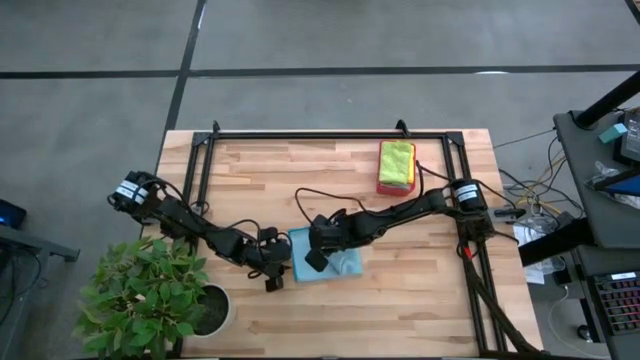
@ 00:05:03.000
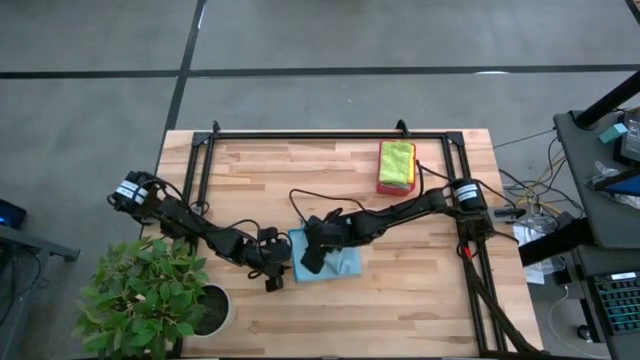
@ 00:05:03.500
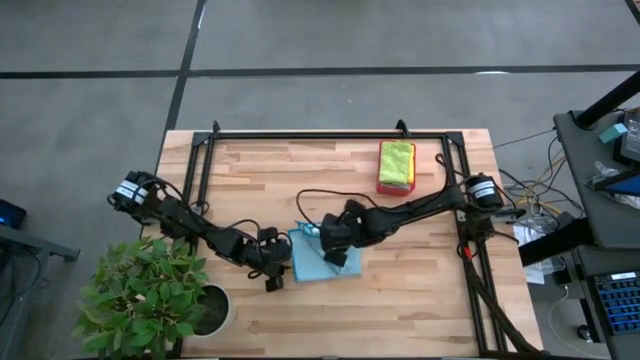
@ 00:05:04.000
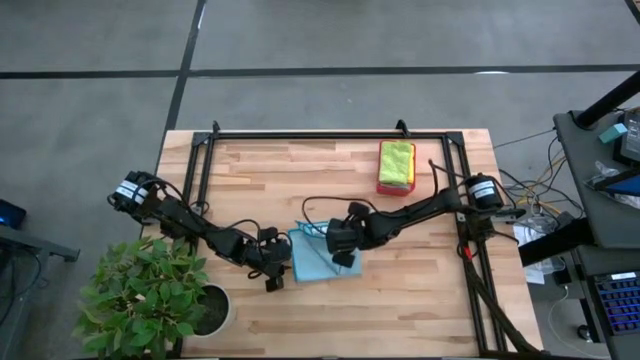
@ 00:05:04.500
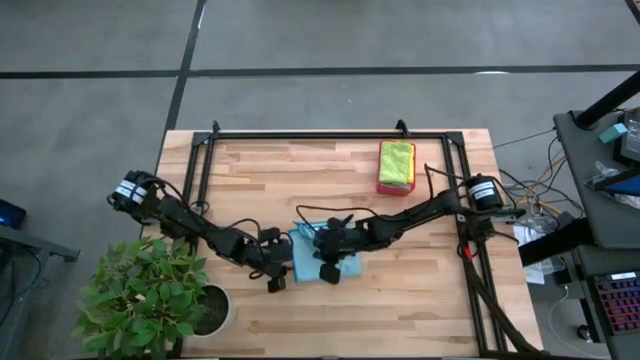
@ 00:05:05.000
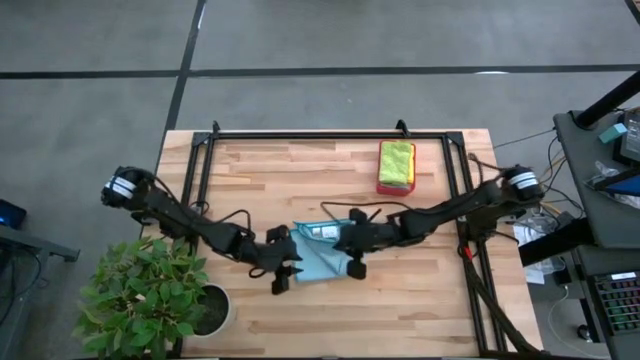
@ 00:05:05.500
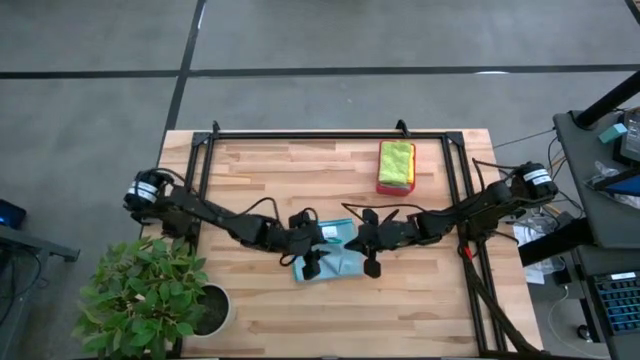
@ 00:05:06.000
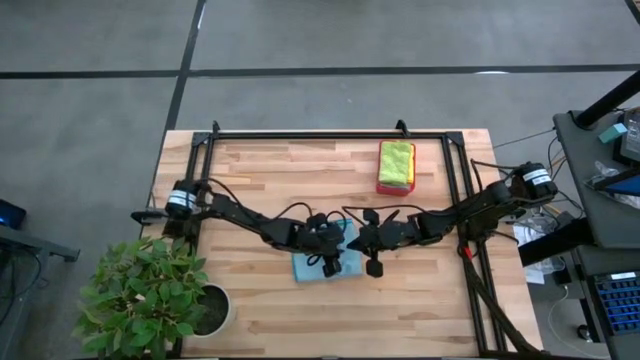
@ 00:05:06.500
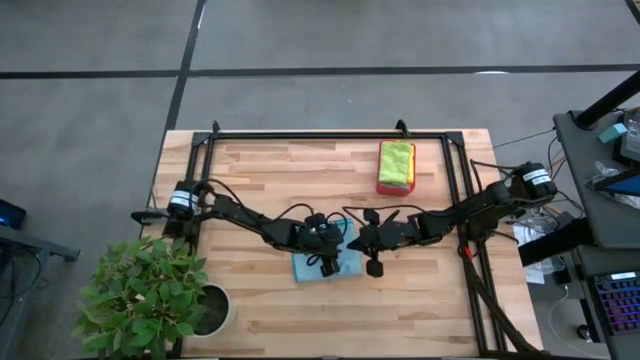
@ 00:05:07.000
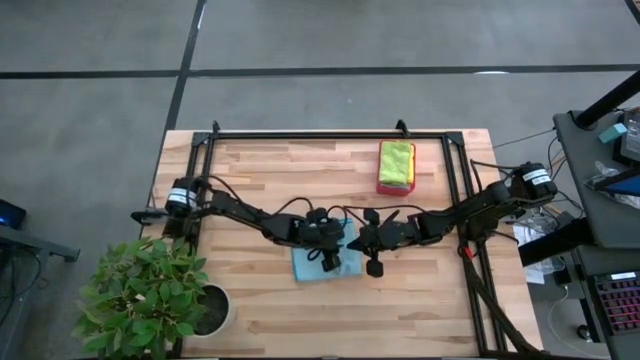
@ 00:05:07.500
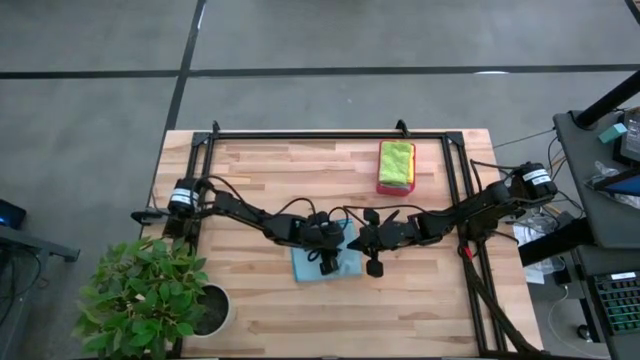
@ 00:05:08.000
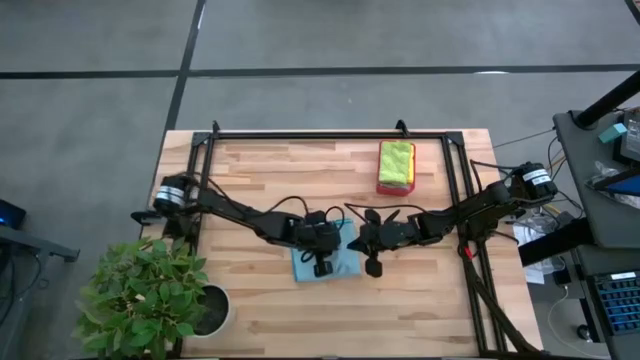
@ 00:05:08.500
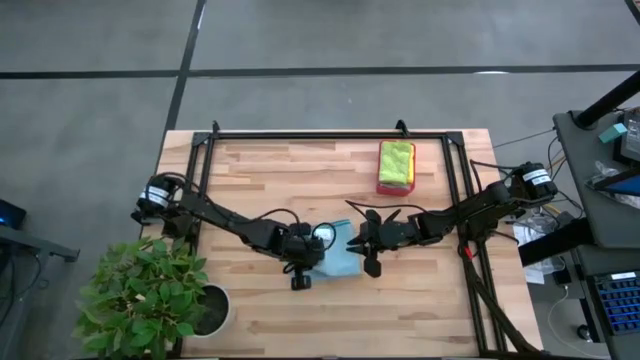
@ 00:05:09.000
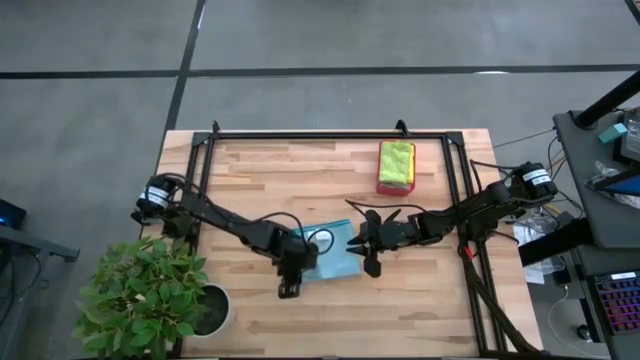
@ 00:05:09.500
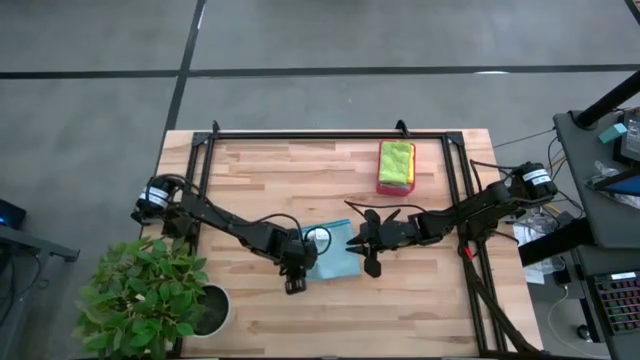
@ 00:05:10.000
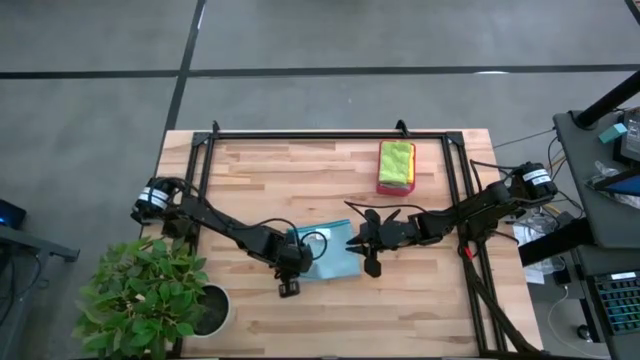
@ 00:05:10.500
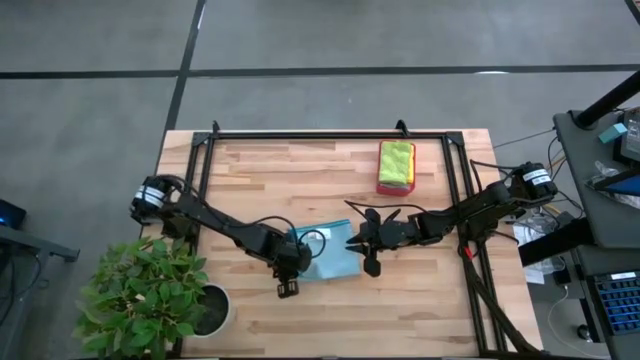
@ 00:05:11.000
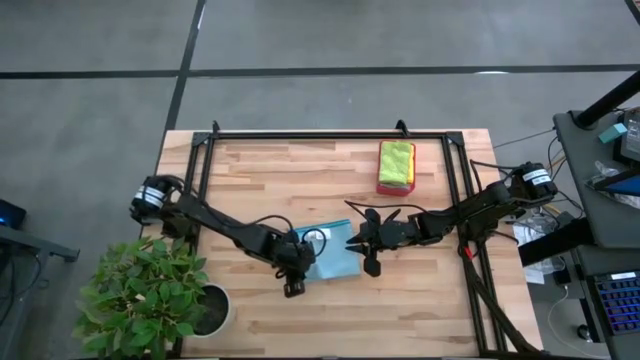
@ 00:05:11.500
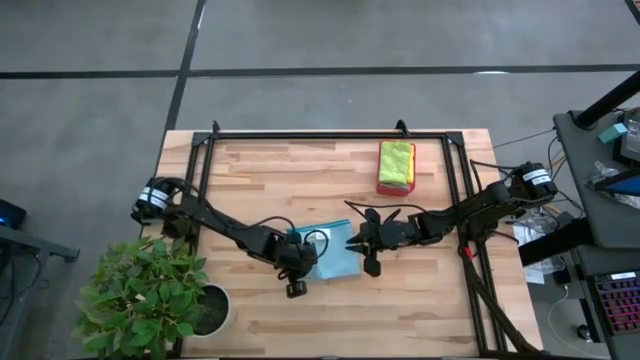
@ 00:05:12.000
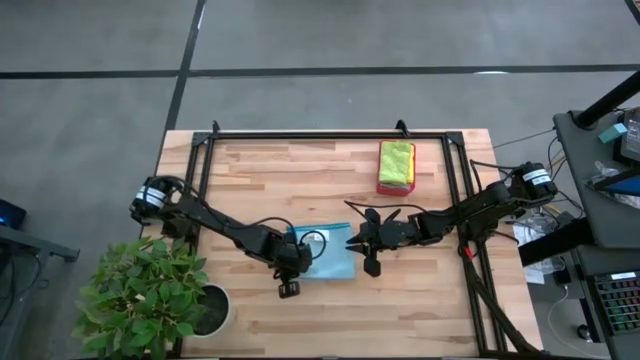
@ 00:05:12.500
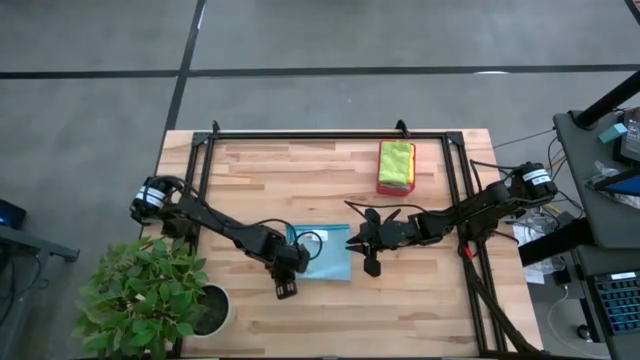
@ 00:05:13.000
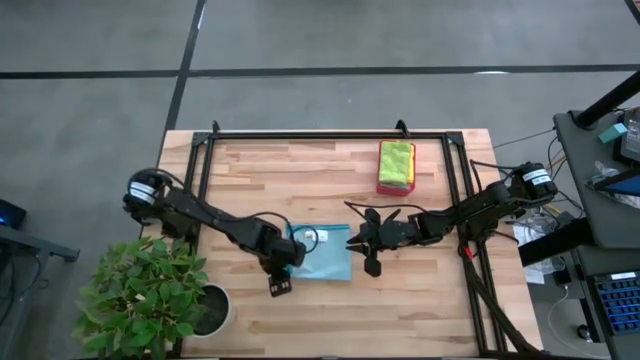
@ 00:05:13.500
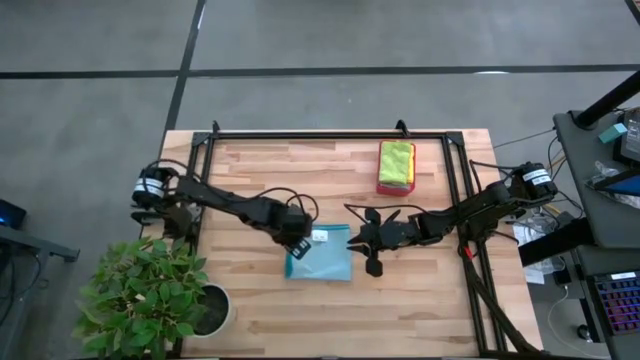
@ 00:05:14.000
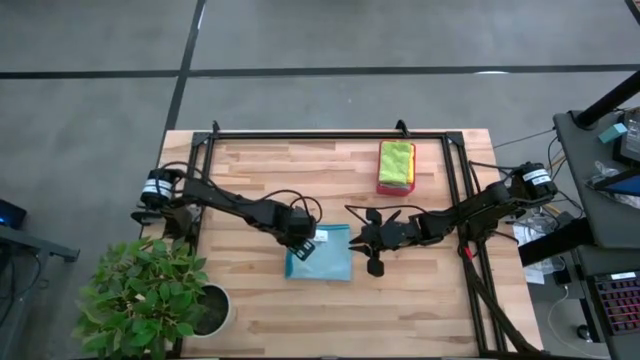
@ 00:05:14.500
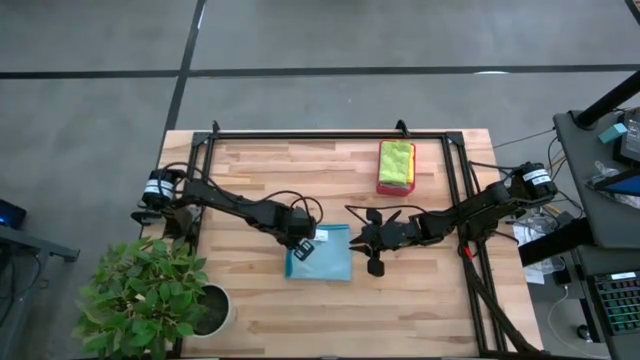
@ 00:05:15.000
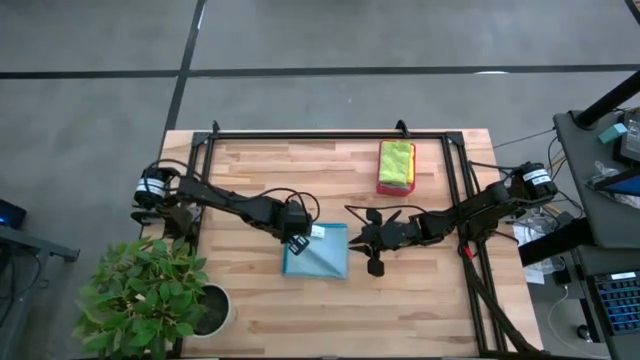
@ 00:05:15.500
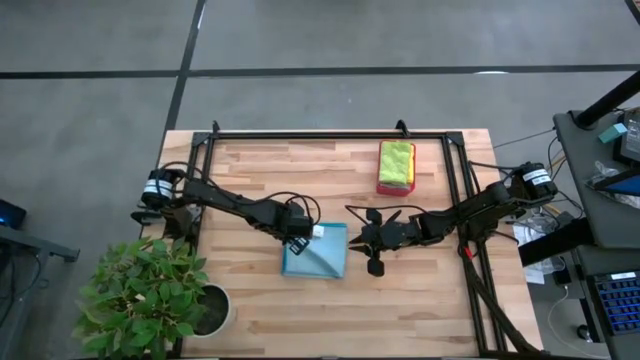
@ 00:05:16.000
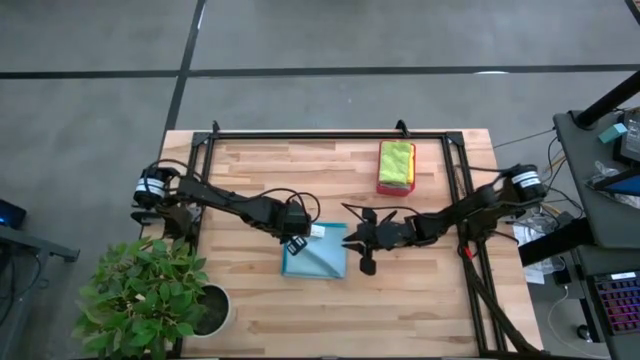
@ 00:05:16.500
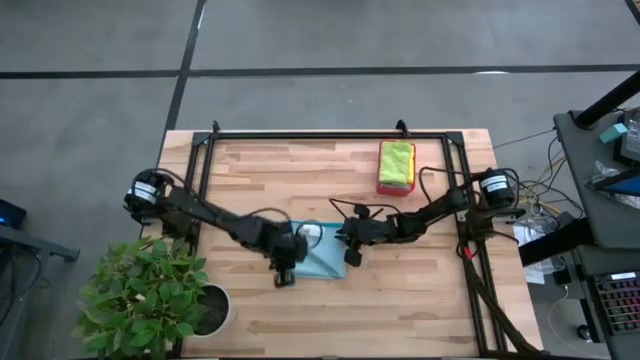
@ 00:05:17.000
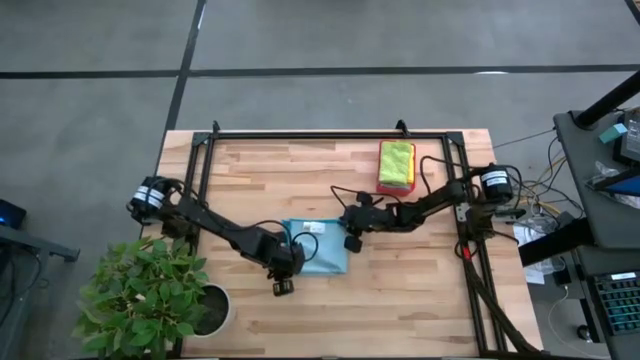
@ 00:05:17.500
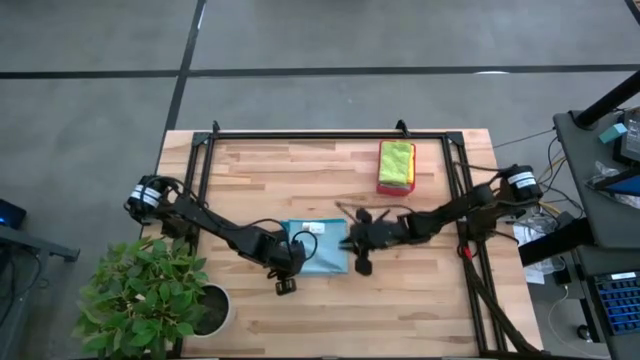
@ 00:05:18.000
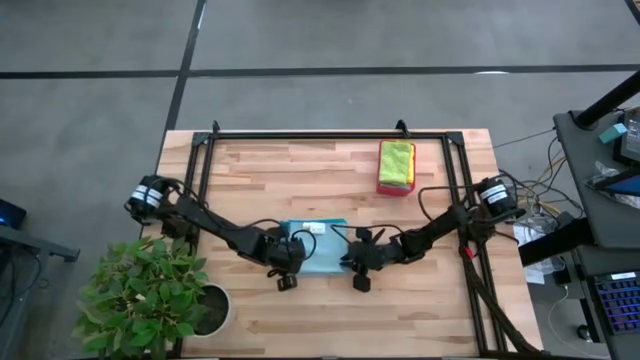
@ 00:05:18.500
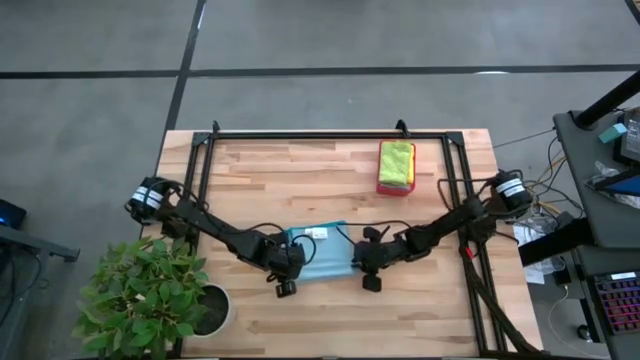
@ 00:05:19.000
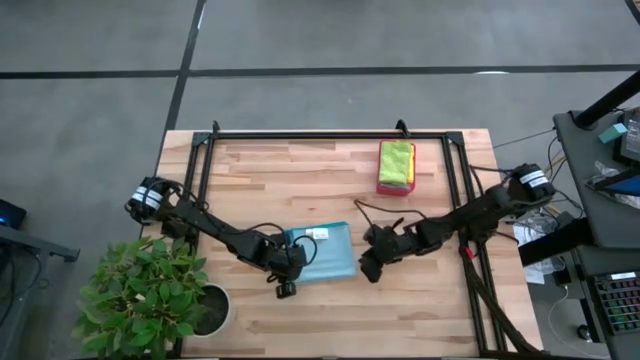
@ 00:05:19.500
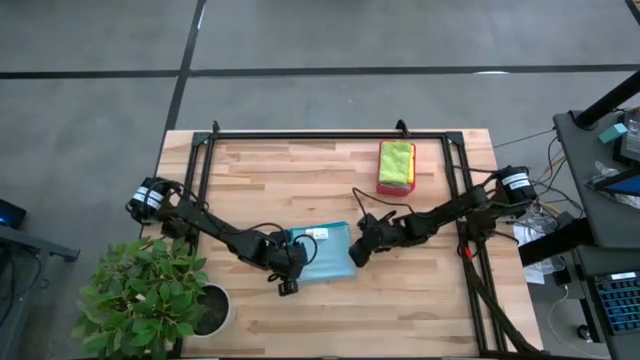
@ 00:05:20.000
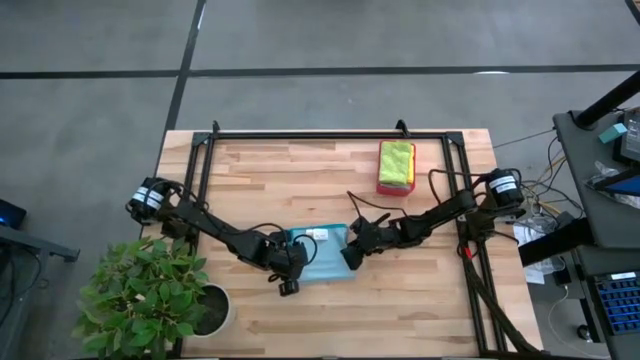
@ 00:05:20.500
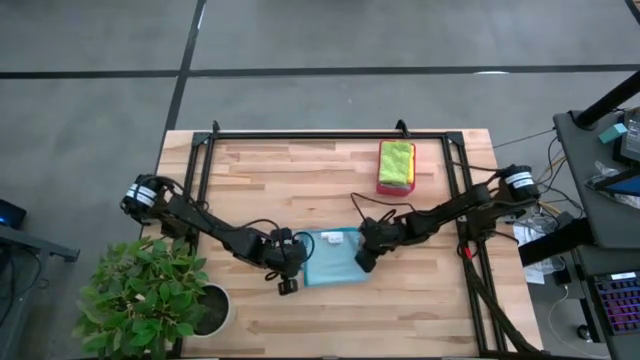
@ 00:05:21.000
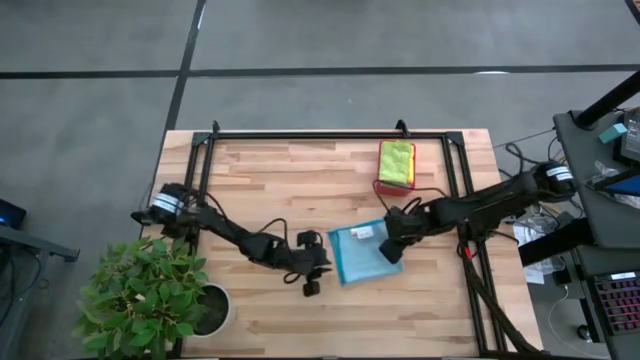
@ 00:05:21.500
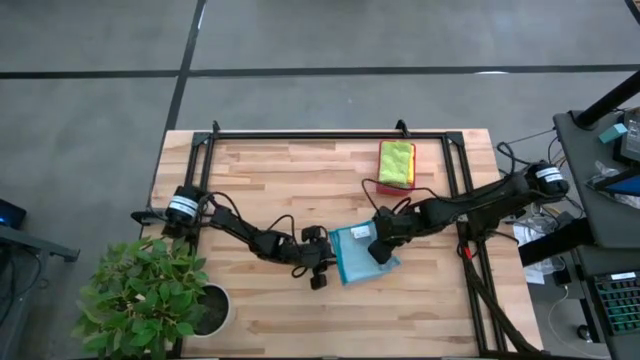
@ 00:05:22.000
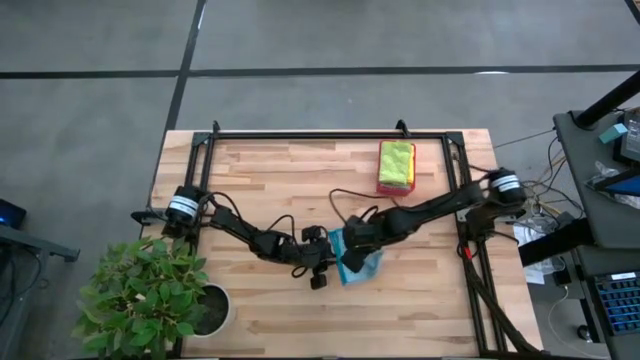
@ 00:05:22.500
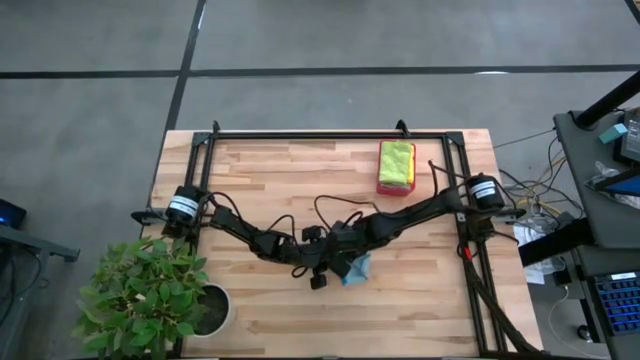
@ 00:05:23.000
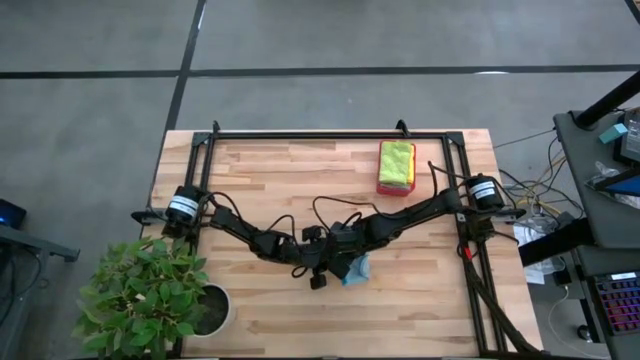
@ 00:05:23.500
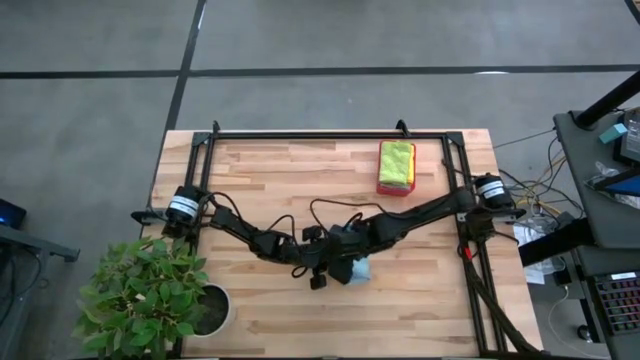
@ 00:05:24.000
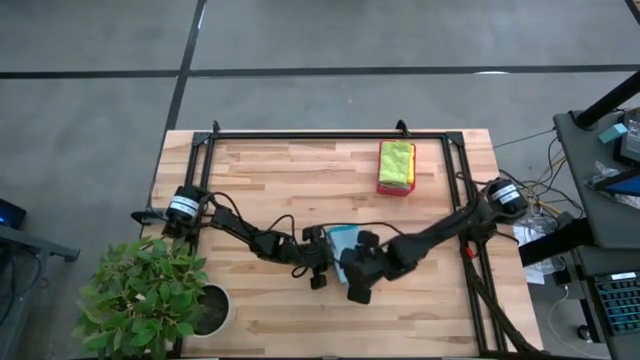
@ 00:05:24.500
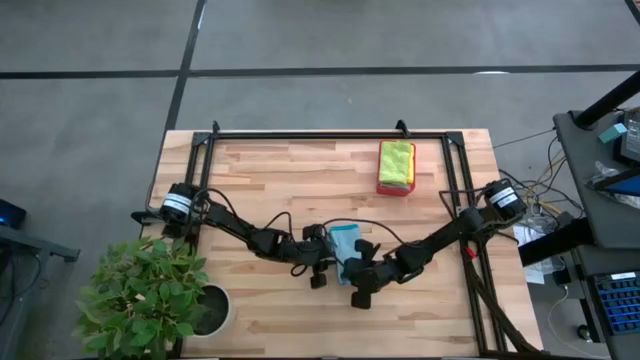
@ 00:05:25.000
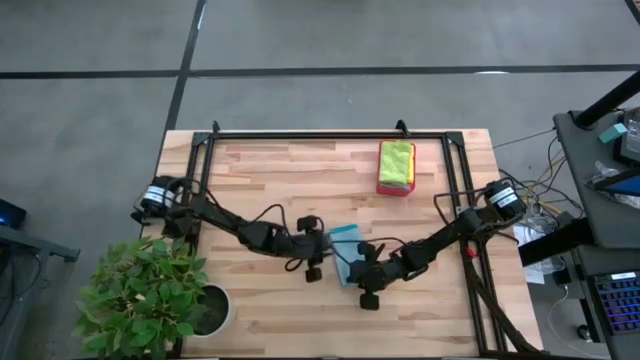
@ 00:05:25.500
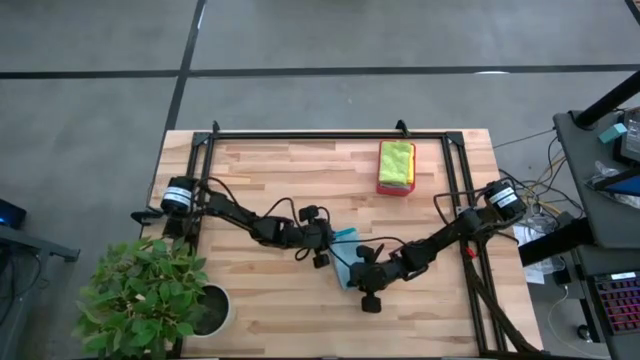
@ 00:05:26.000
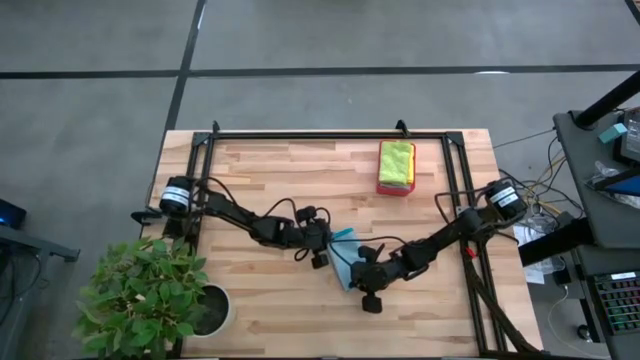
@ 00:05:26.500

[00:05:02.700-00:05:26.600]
Task: Fold microfiber towels
Fold the blue microfiber towel
